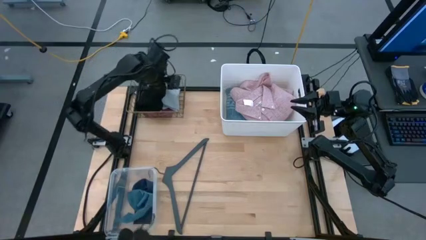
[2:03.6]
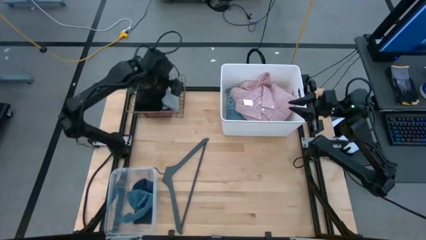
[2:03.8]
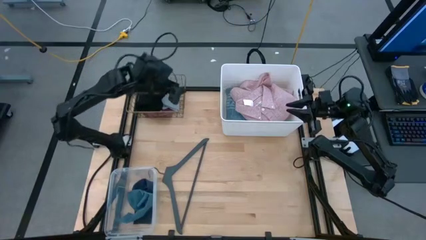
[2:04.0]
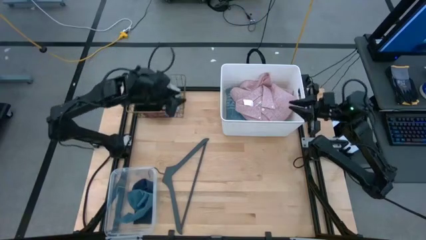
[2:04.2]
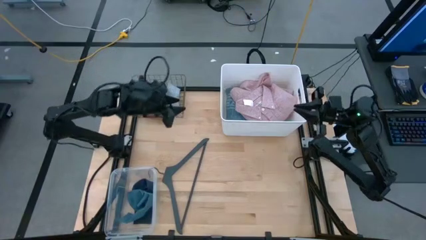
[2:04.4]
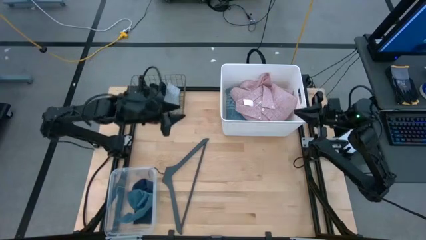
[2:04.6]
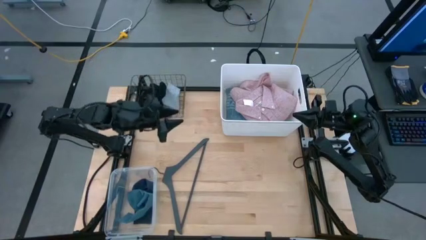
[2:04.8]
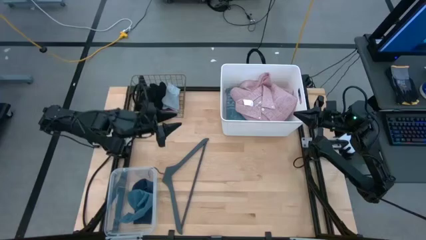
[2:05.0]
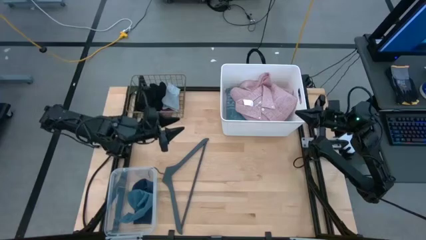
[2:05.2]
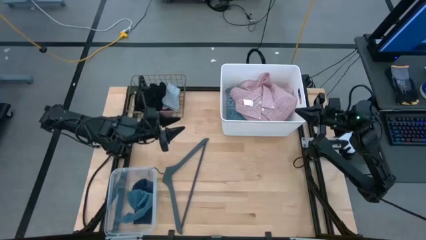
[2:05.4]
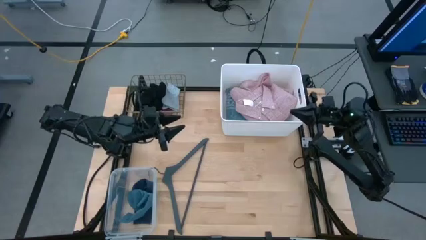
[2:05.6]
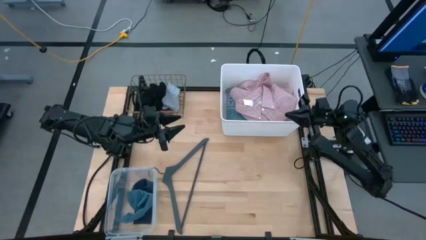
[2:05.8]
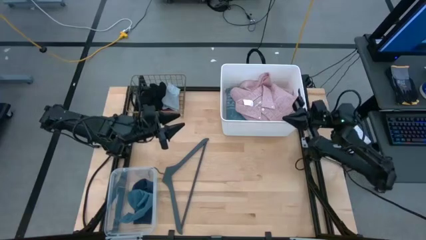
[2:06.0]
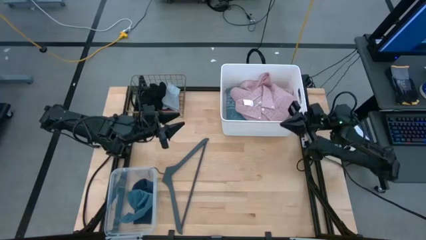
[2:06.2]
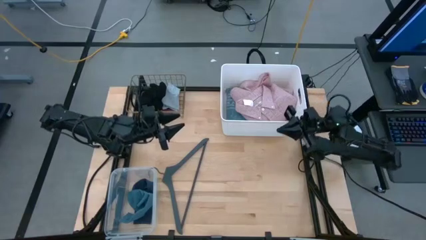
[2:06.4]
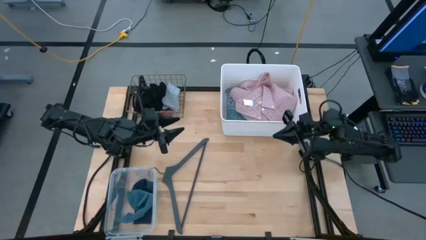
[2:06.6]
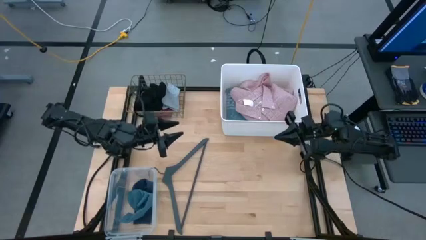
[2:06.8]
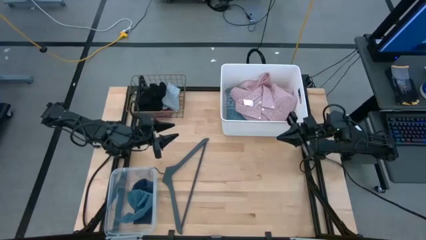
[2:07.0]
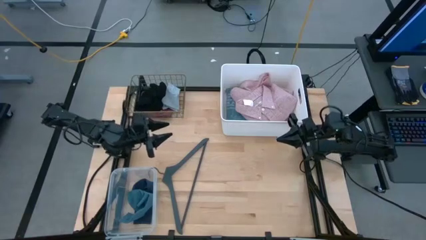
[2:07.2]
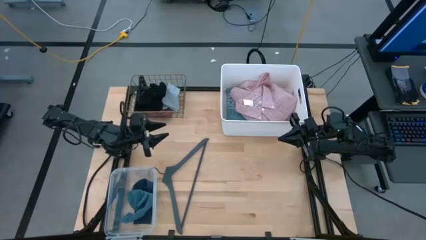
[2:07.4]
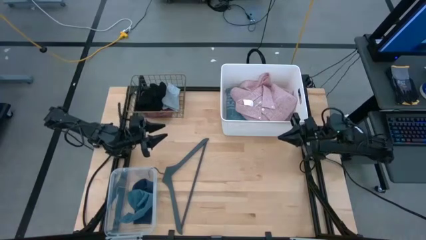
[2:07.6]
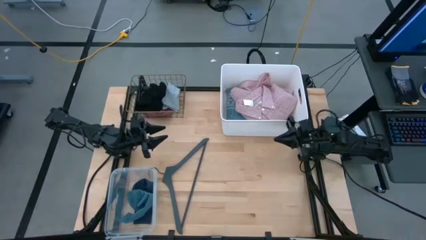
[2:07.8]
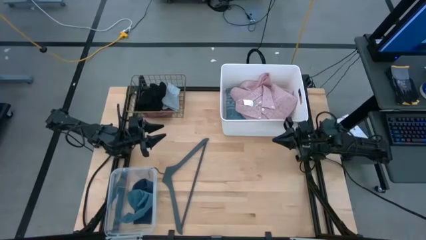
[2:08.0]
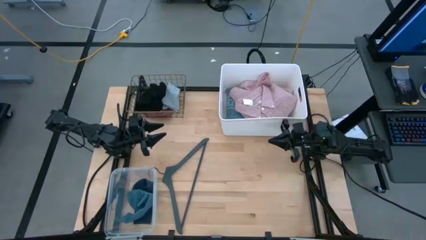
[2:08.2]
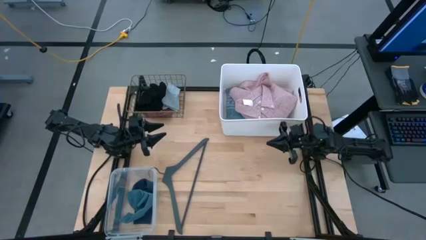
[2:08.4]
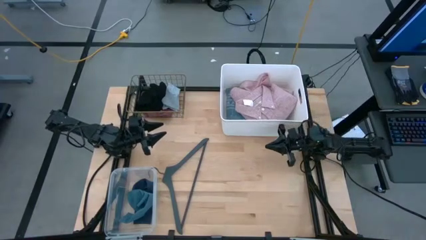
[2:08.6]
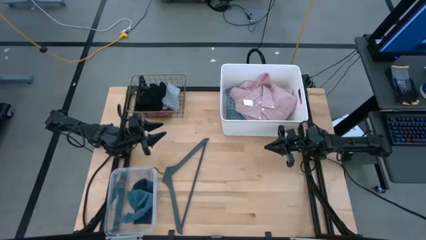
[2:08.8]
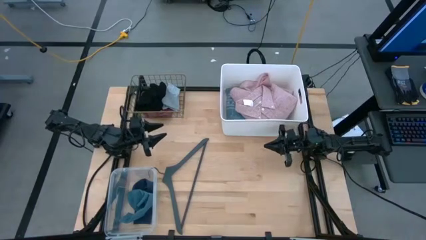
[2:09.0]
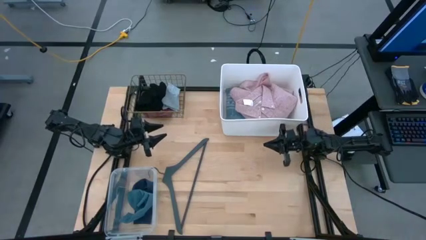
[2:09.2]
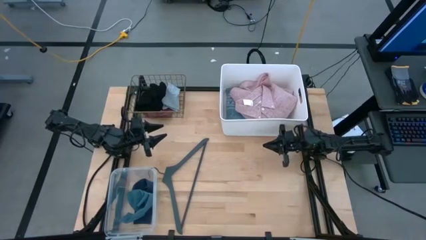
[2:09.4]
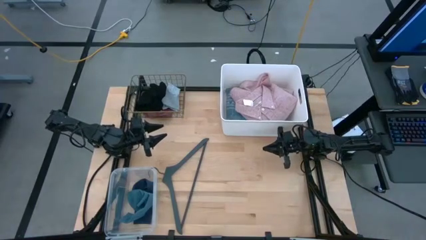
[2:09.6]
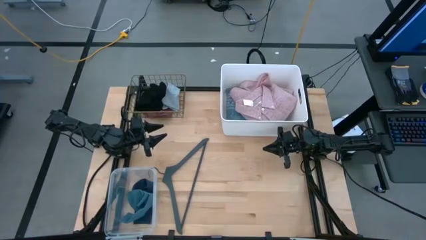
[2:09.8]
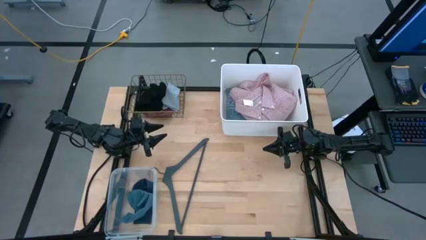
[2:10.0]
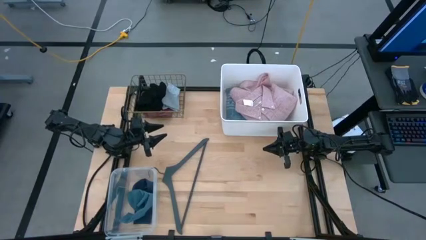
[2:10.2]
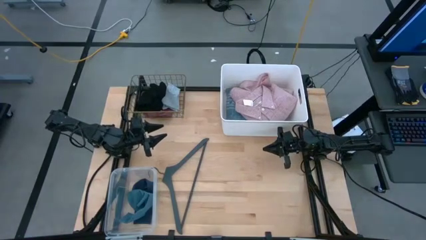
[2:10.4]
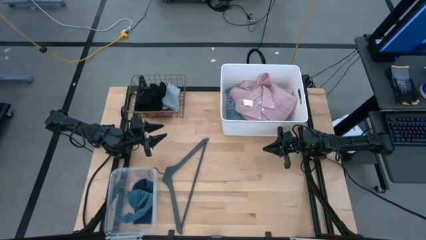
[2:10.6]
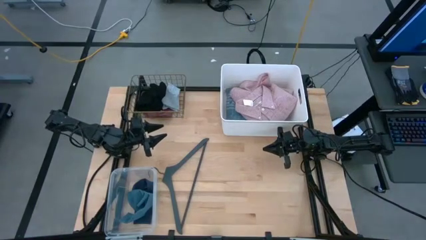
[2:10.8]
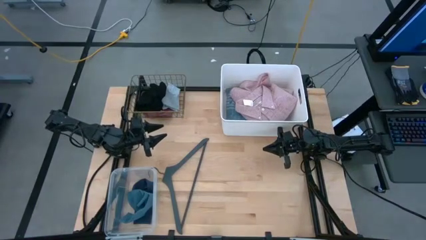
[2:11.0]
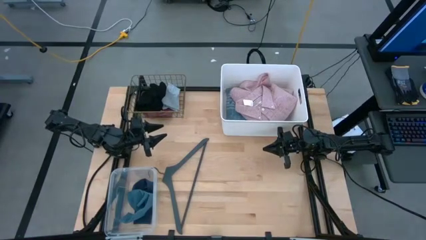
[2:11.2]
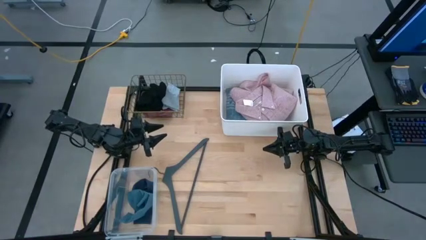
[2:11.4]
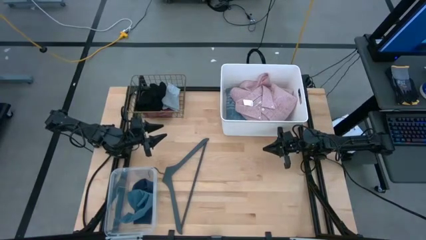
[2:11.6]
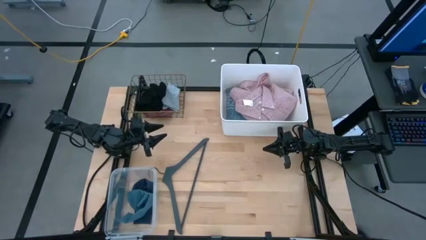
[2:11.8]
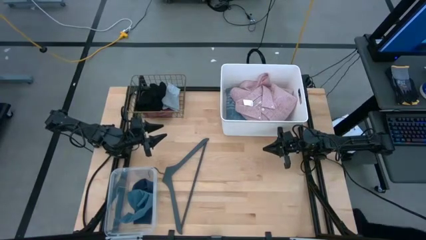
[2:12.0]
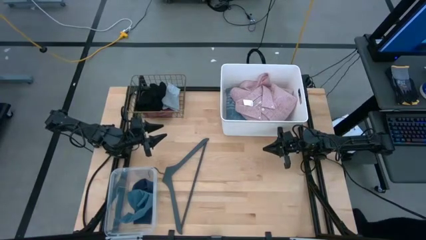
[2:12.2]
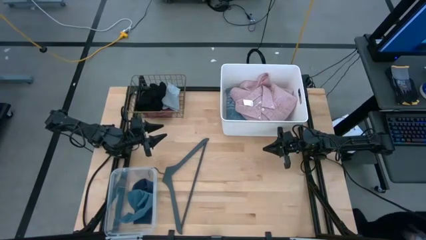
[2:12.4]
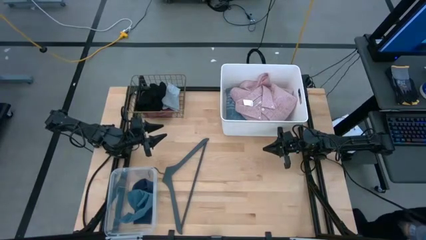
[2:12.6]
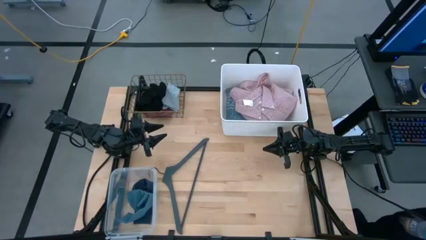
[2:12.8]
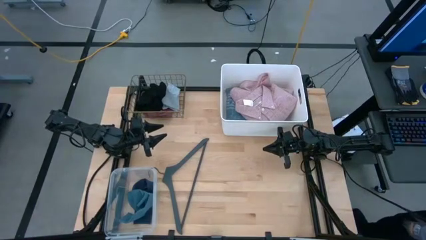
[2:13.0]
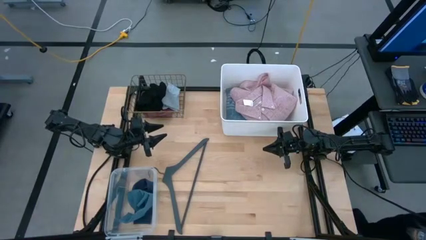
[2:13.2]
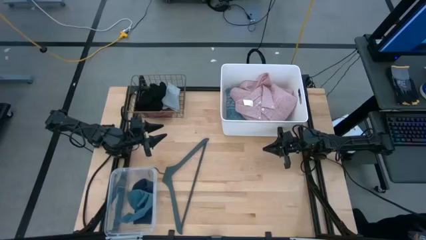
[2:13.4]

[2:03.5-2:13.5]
Task: Pick & Place Cloths
Return to Home Position
